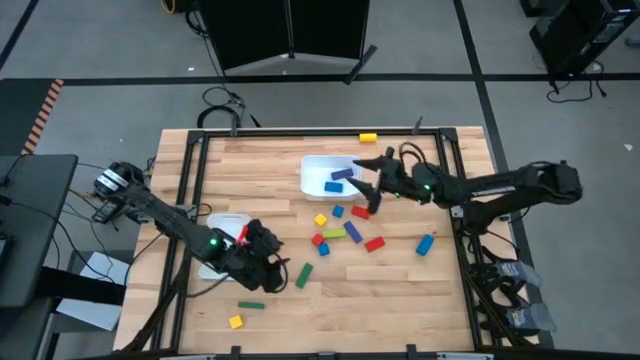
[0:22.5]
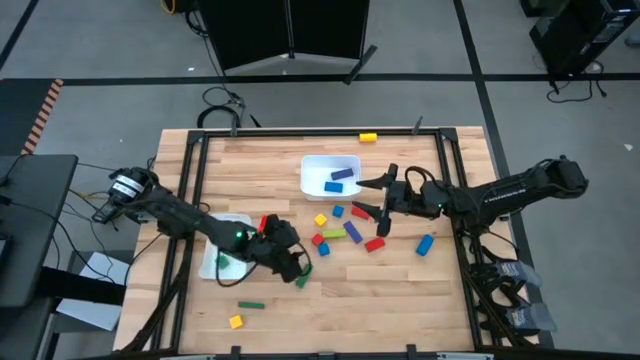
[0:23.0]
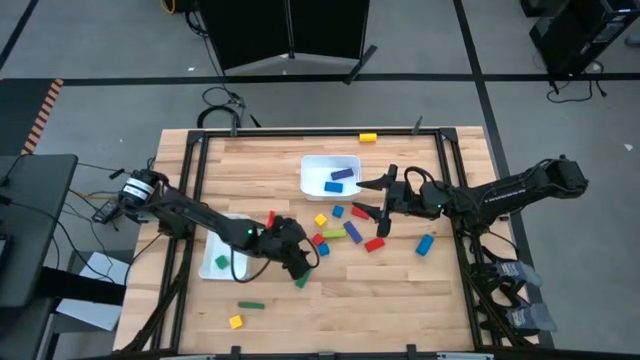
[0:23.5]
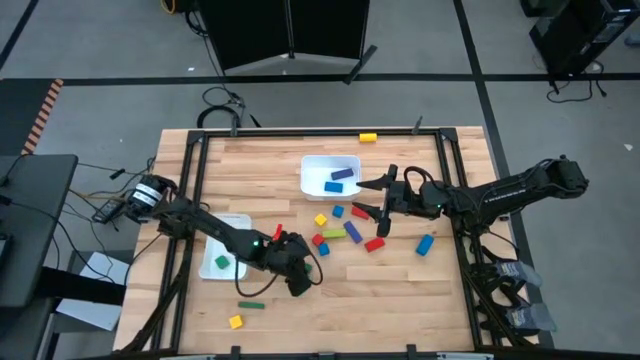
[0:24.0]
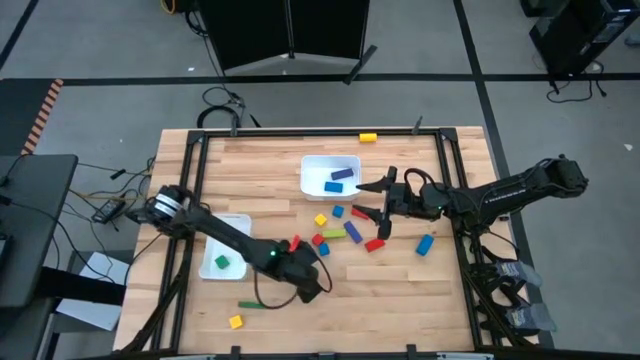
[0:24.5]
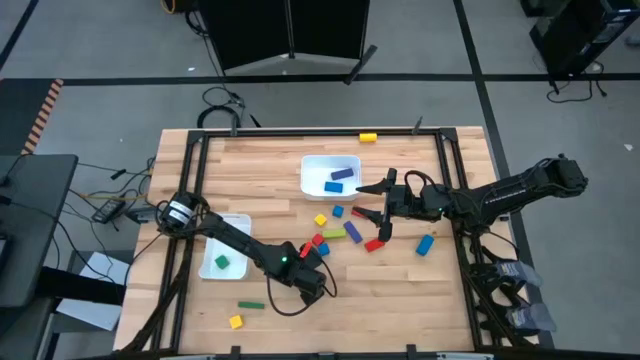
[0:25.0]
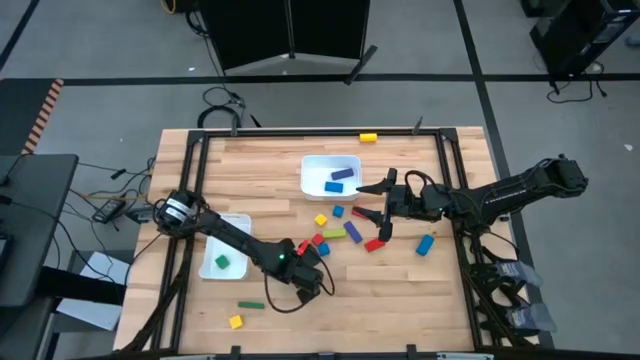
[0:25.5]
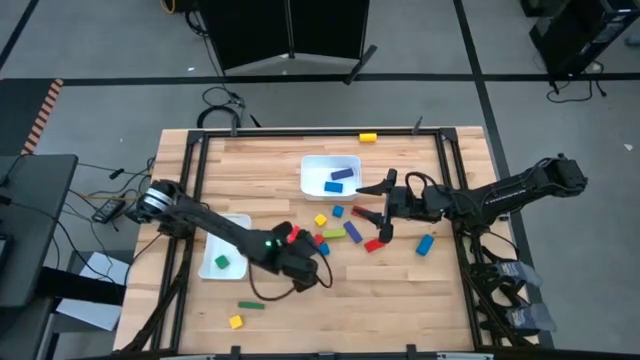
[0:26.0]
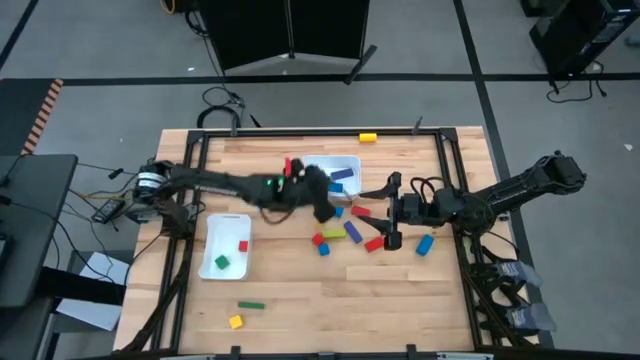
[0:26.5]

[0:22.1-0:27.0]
Task: Sort blocks by size
Put the rectangular green block into the top white bin

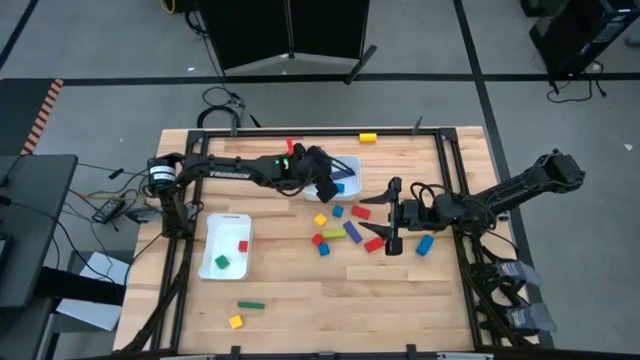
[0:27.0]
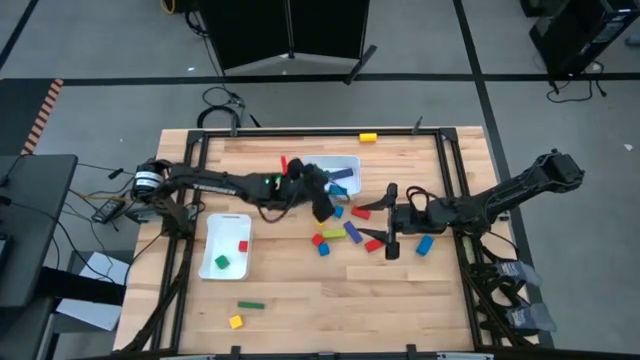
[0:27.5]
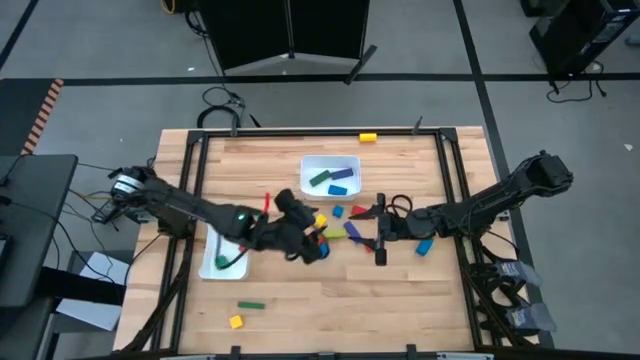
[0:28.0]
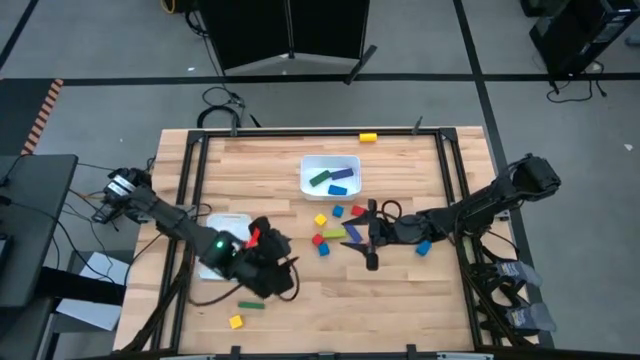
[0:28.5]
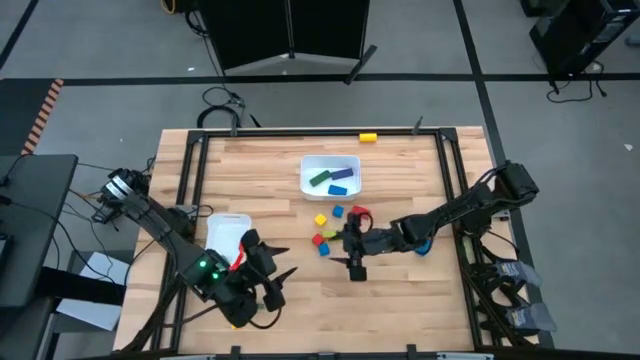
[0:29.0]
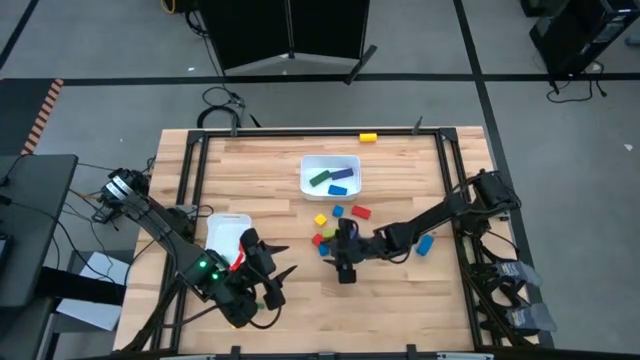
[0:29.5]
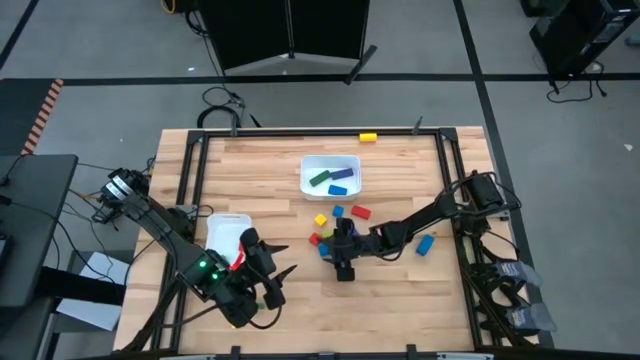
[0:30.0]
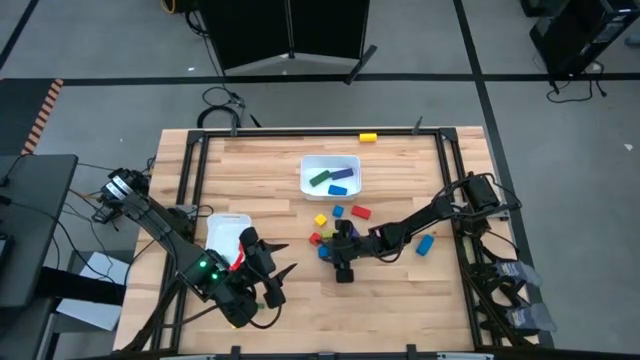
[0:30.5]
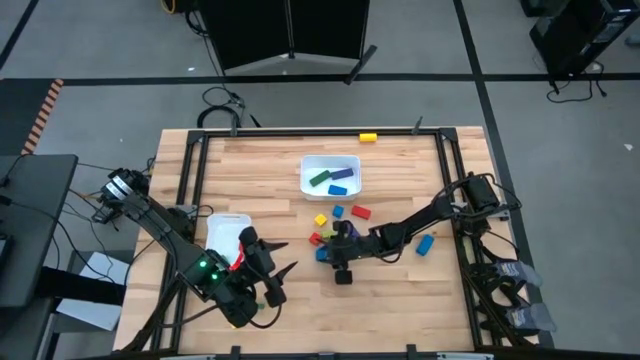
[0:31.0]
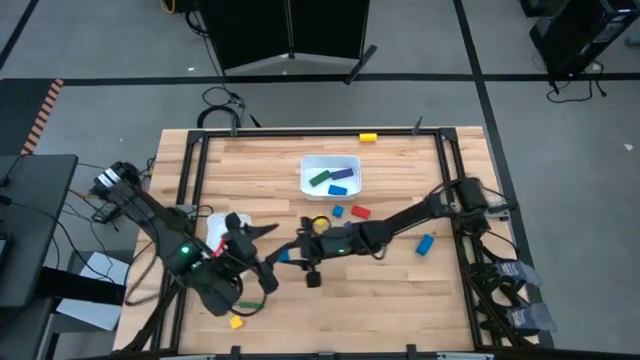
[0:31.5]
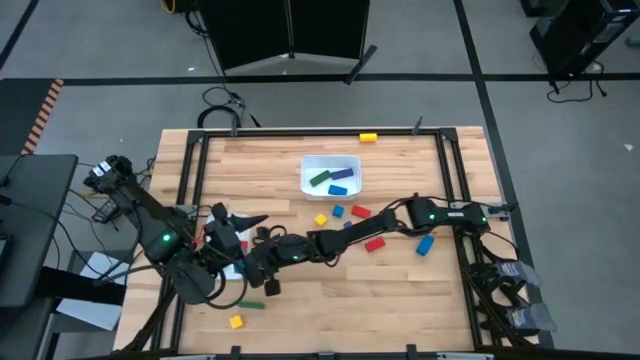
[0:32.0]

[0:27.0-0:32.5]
Put the square blue block into the bottom white bin

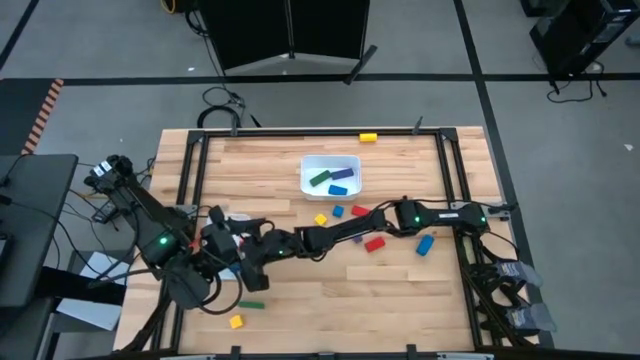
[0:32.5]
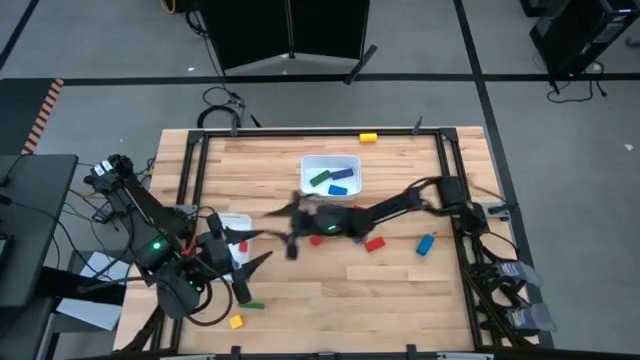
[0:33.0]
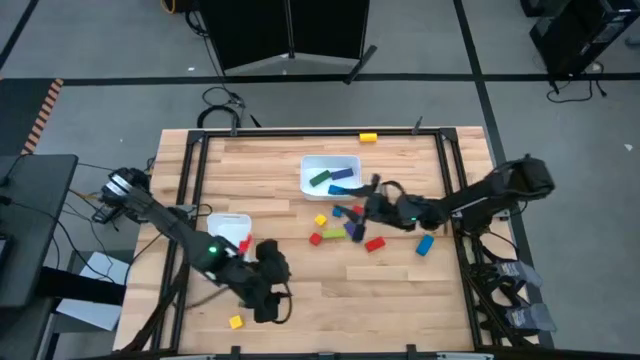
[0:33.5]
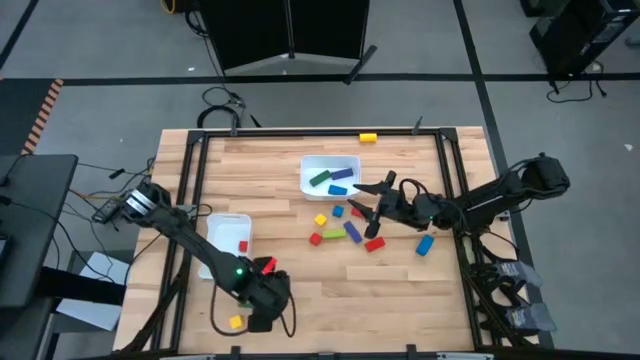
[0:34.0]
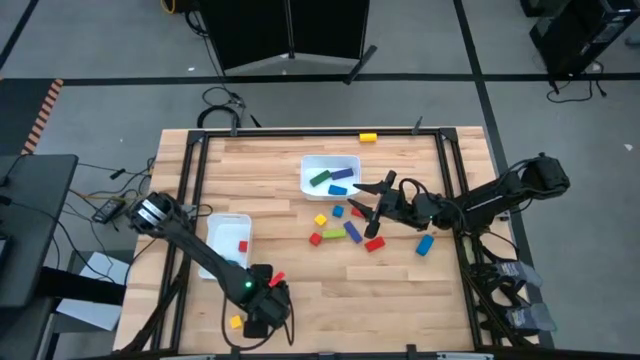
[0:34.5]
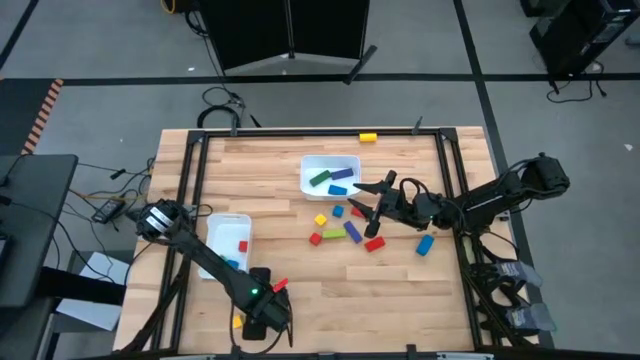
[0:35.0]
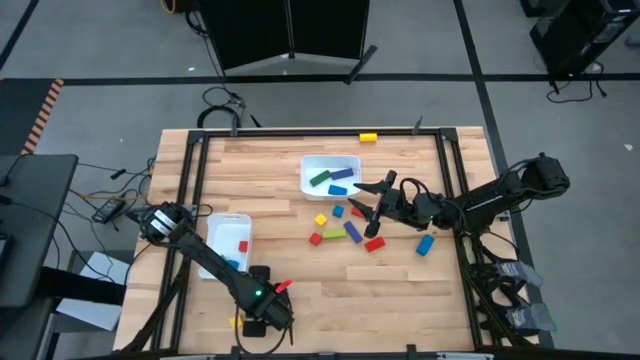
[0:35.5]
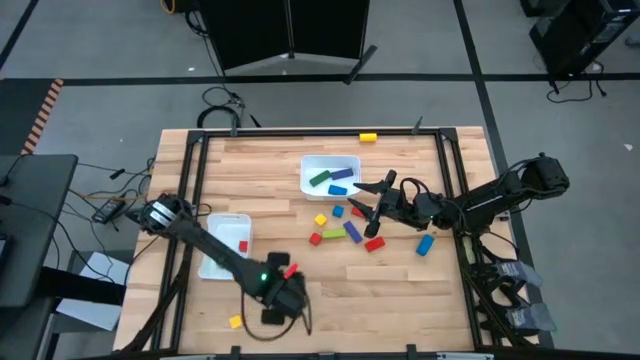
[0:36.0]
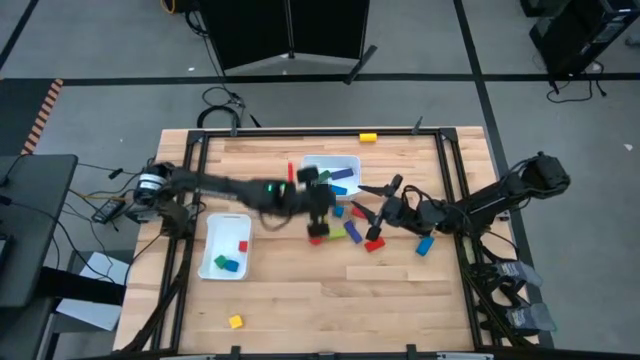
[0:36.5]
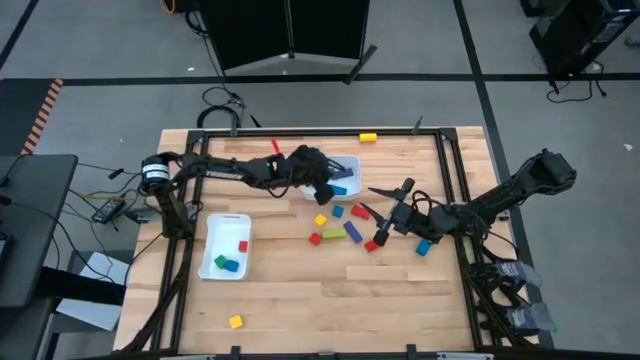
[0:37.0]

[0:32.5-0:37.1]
Put the rectangular green block into the top white bin

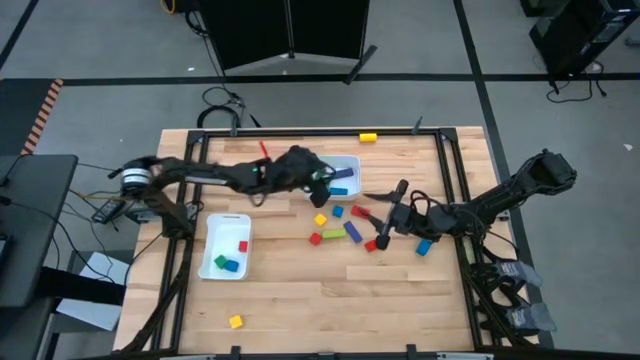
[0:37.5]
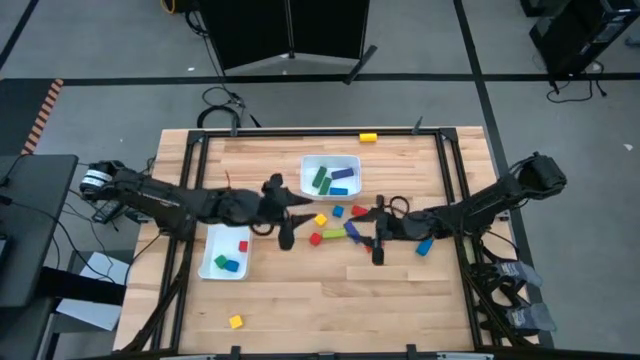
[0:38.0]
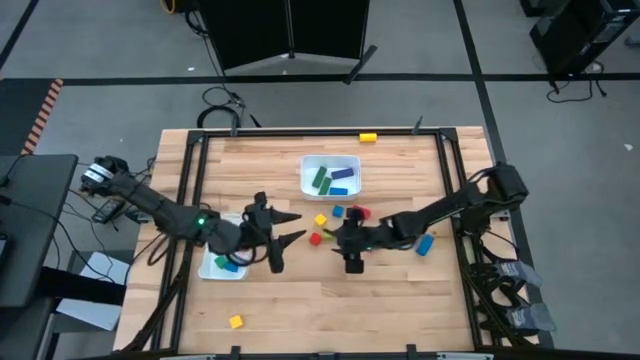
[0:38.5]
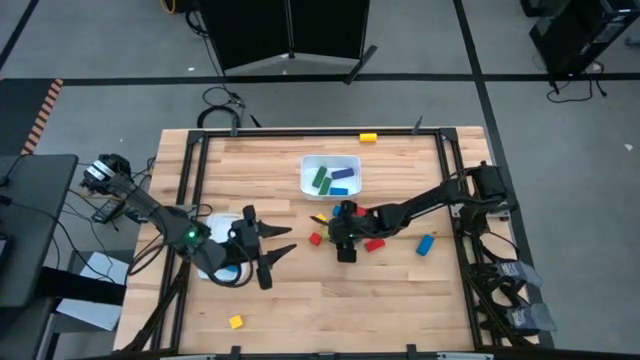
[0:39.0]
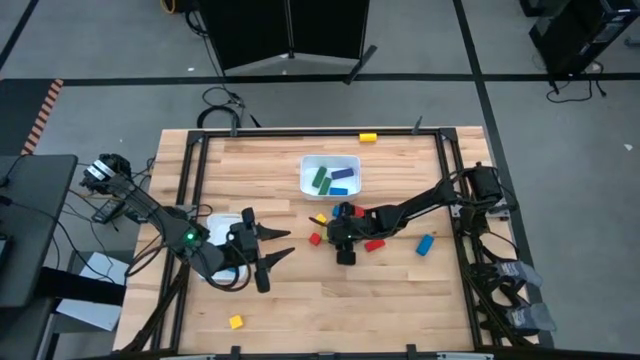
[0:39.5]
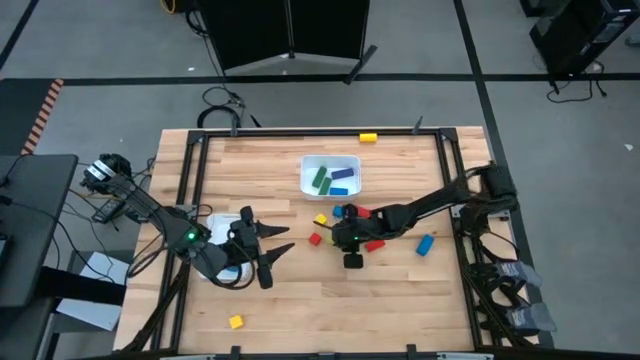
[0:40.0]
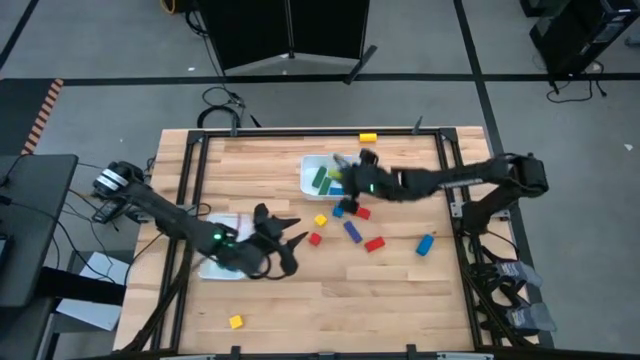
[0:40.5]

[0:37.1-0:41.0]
Put the rectangular light green block into the top white bin

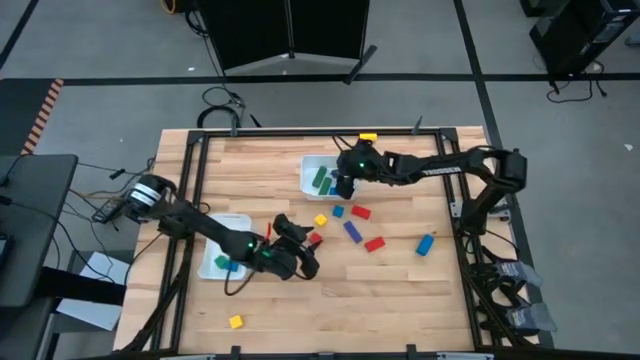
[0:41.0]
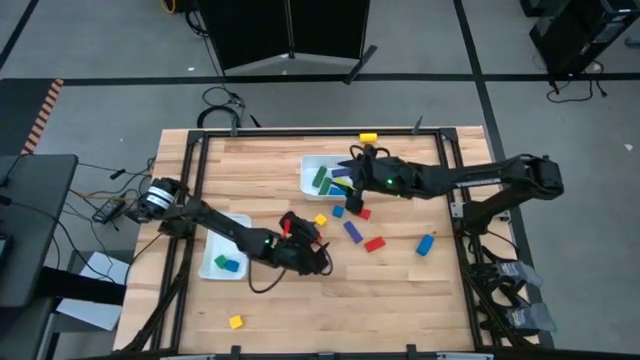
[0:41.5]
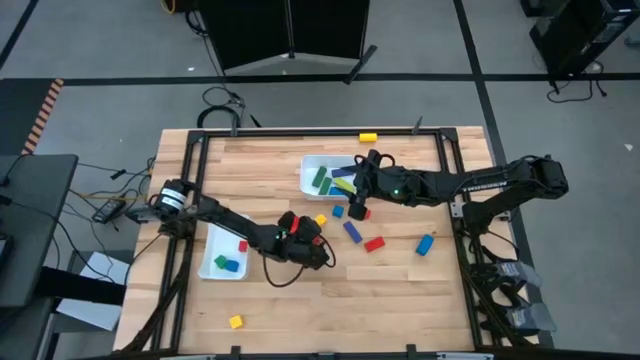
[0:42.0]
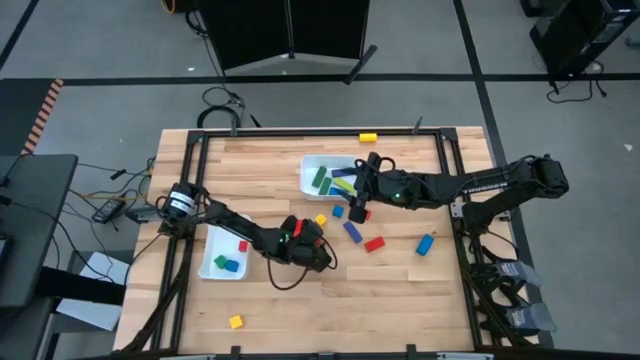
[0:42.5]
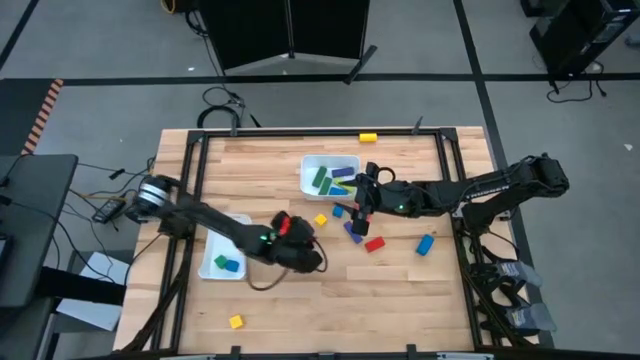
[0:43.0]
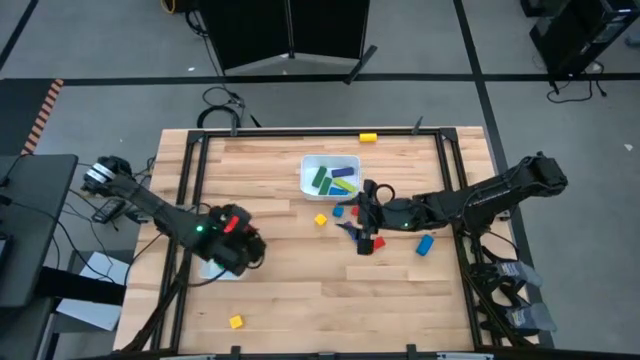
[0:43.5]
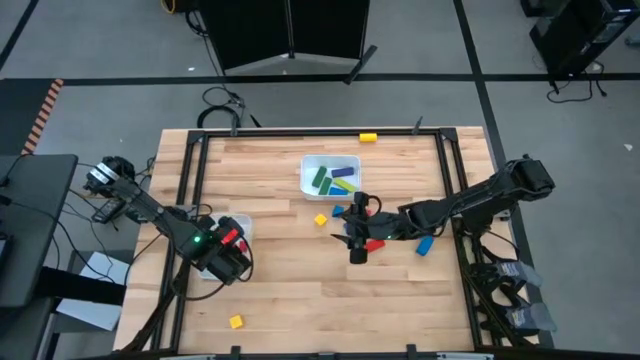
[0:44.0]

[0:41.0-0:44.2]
Put the square red block into the bottom white bin
